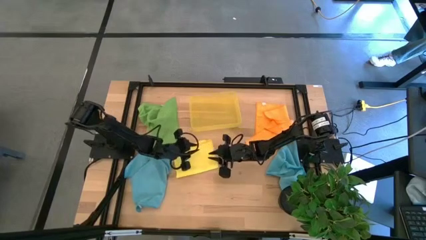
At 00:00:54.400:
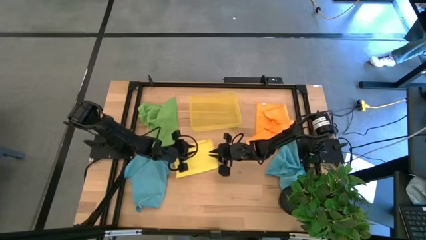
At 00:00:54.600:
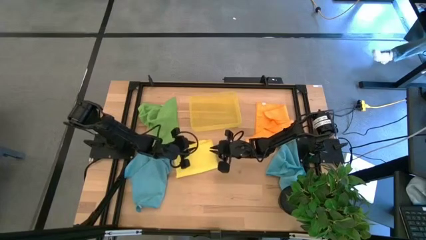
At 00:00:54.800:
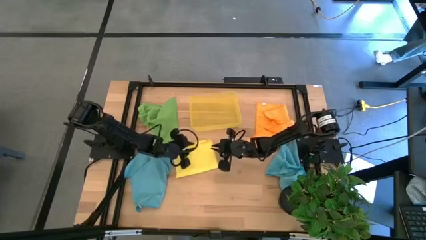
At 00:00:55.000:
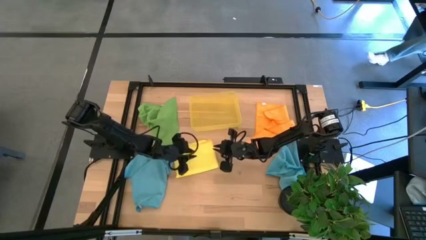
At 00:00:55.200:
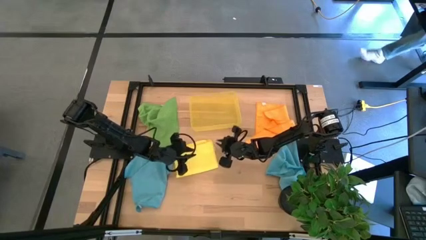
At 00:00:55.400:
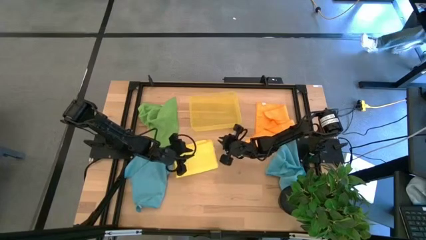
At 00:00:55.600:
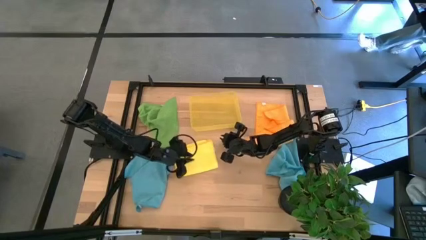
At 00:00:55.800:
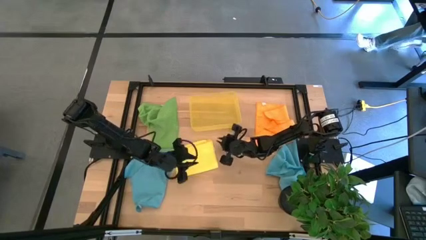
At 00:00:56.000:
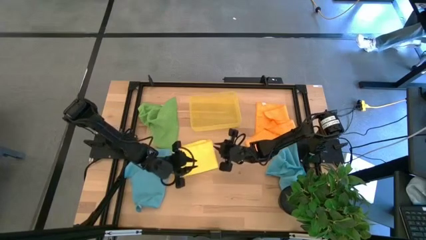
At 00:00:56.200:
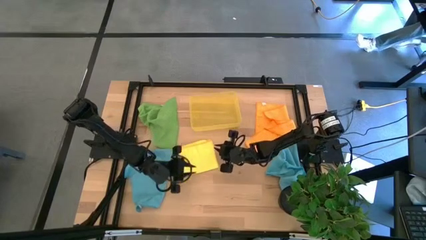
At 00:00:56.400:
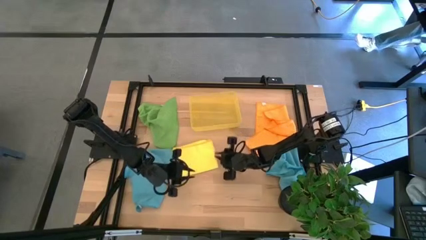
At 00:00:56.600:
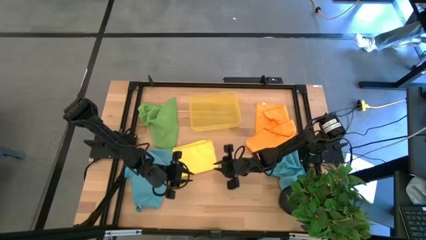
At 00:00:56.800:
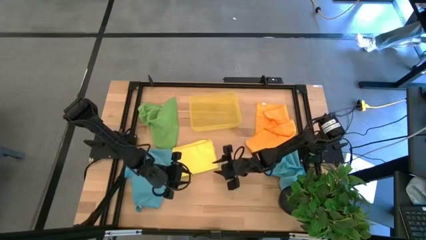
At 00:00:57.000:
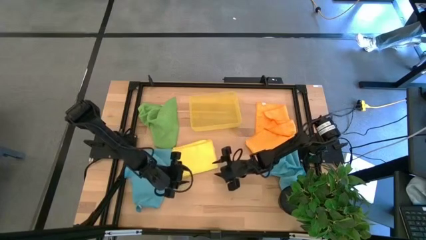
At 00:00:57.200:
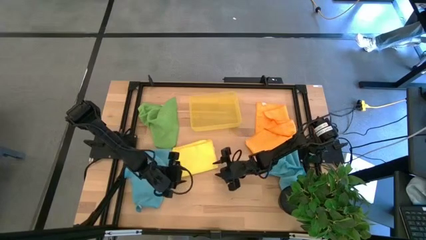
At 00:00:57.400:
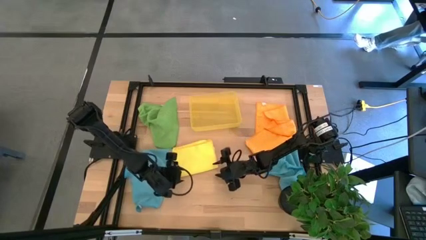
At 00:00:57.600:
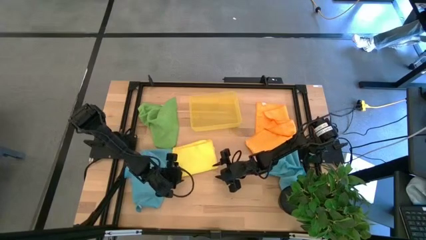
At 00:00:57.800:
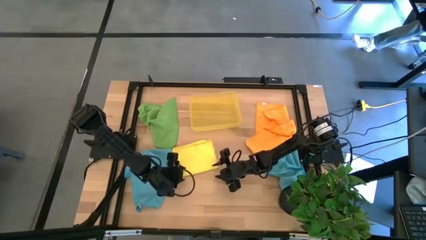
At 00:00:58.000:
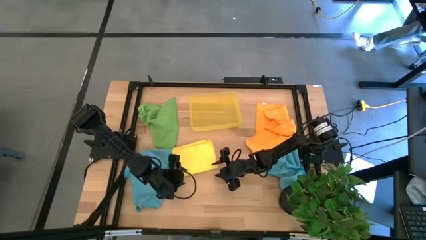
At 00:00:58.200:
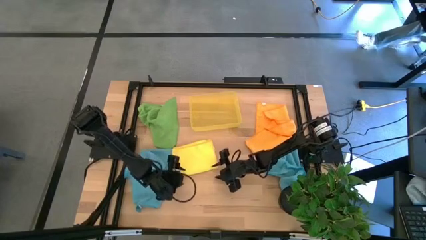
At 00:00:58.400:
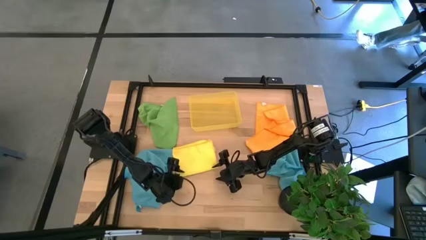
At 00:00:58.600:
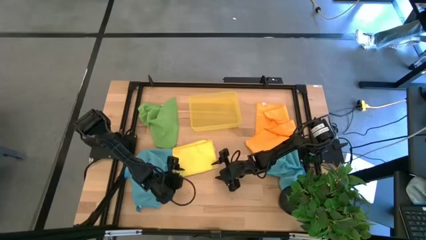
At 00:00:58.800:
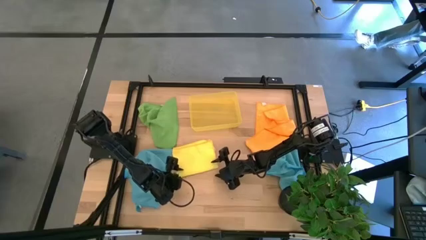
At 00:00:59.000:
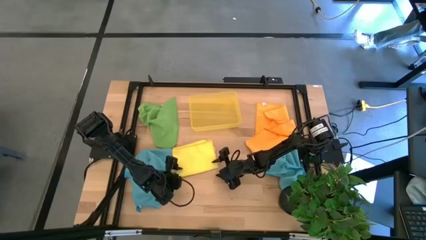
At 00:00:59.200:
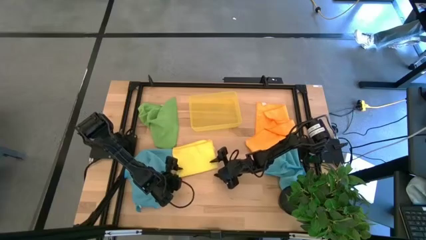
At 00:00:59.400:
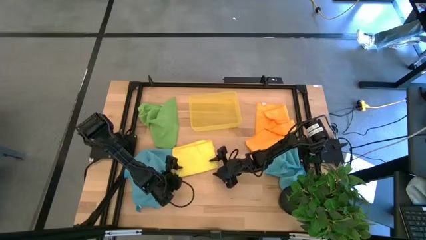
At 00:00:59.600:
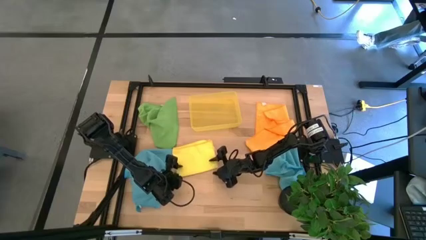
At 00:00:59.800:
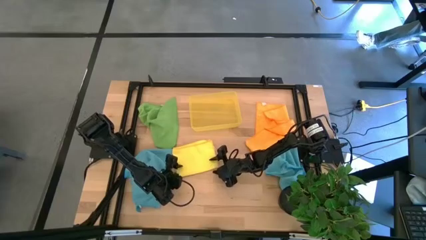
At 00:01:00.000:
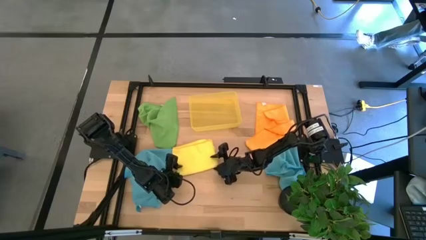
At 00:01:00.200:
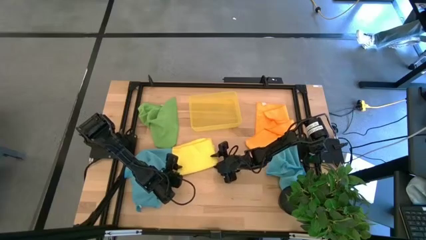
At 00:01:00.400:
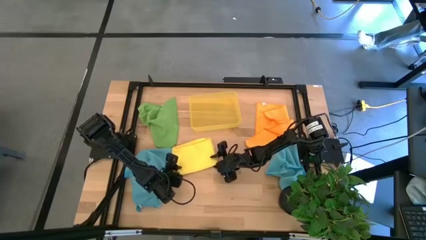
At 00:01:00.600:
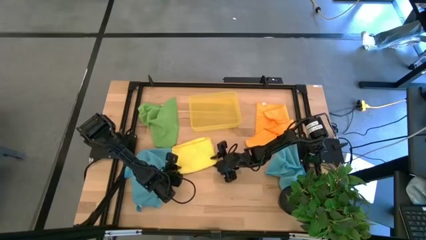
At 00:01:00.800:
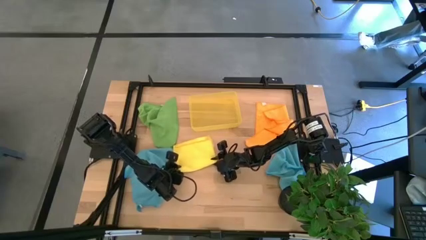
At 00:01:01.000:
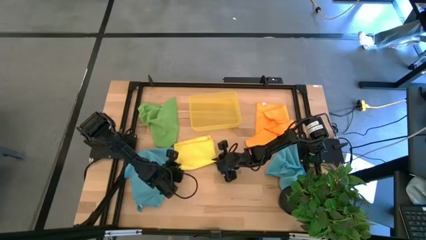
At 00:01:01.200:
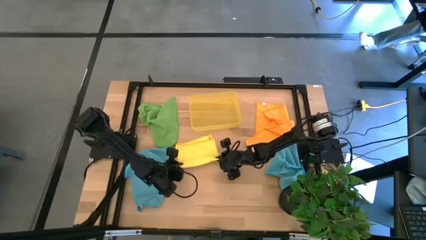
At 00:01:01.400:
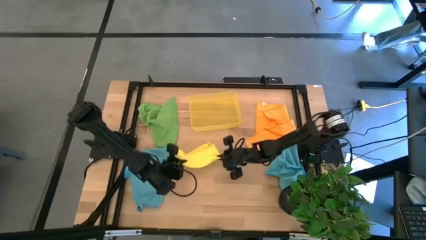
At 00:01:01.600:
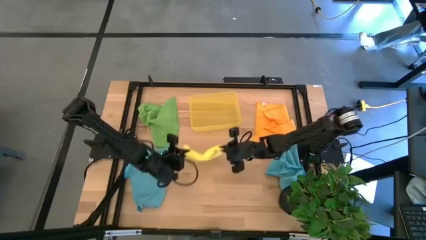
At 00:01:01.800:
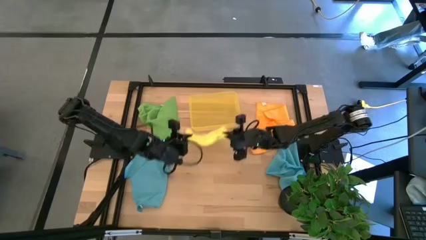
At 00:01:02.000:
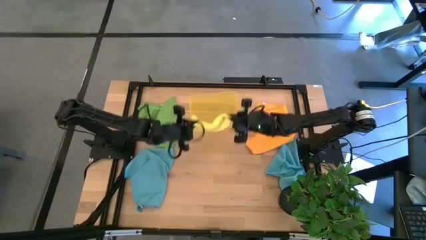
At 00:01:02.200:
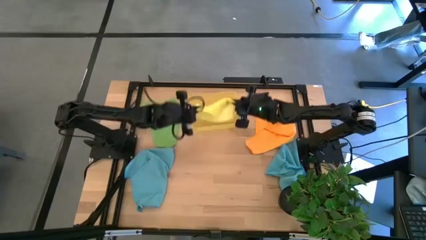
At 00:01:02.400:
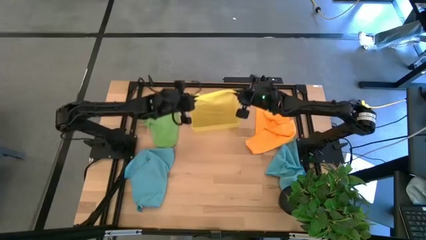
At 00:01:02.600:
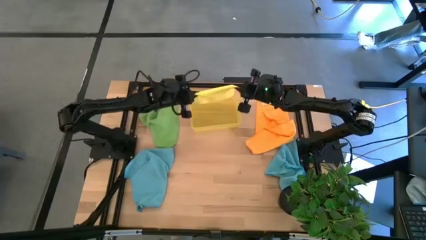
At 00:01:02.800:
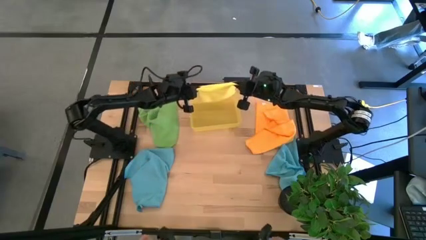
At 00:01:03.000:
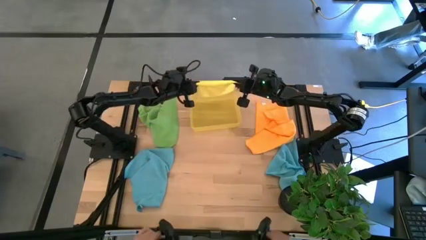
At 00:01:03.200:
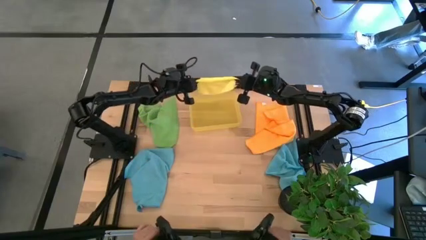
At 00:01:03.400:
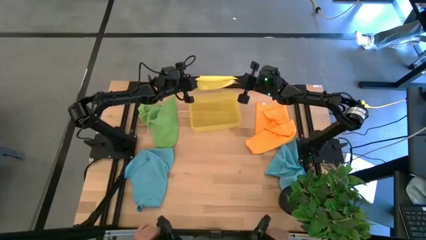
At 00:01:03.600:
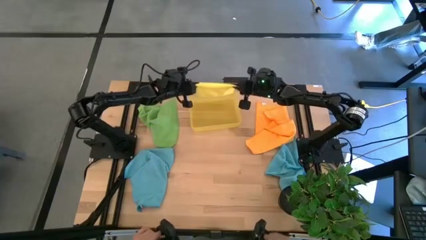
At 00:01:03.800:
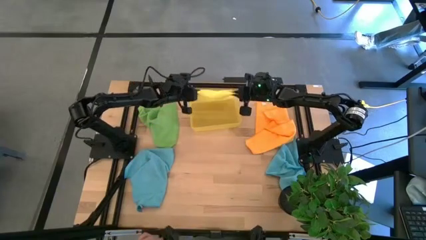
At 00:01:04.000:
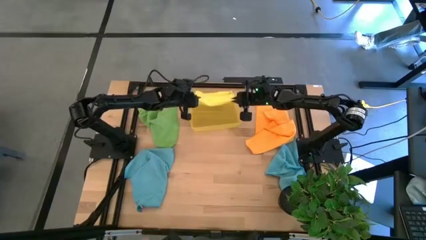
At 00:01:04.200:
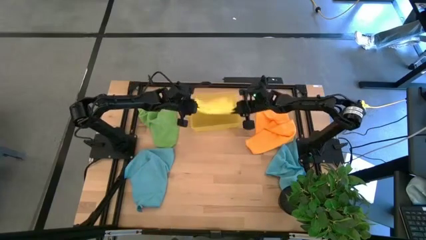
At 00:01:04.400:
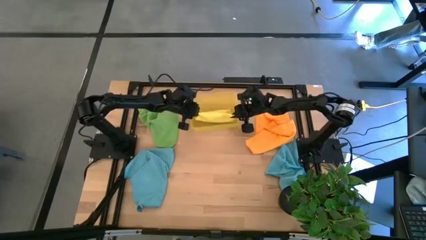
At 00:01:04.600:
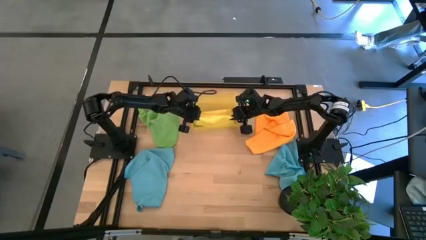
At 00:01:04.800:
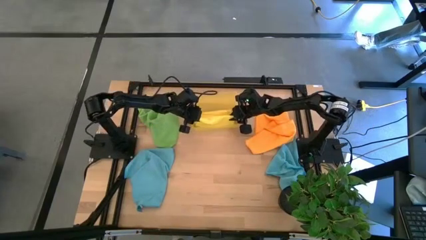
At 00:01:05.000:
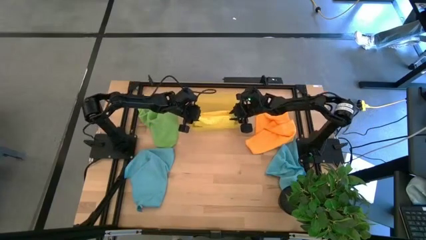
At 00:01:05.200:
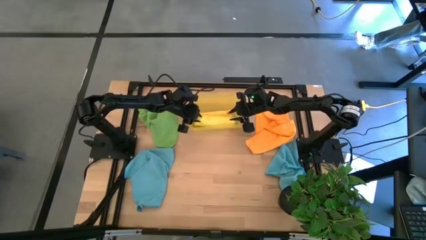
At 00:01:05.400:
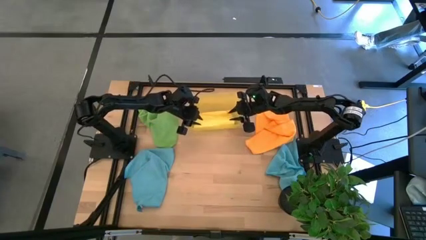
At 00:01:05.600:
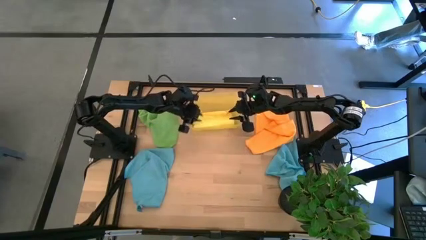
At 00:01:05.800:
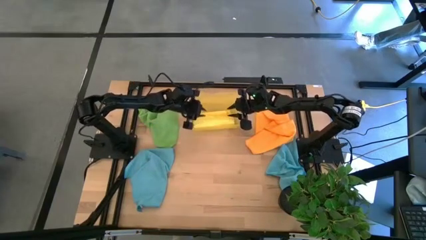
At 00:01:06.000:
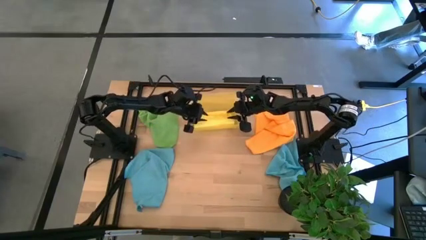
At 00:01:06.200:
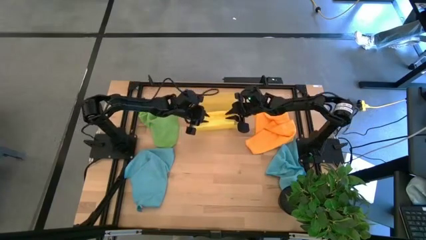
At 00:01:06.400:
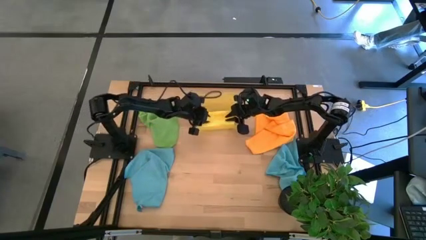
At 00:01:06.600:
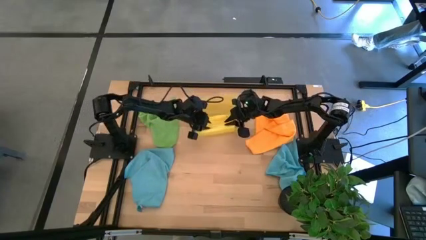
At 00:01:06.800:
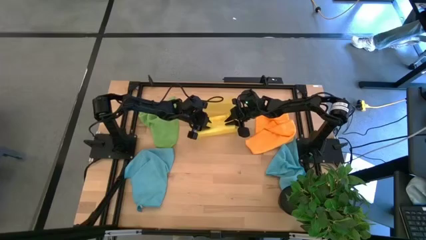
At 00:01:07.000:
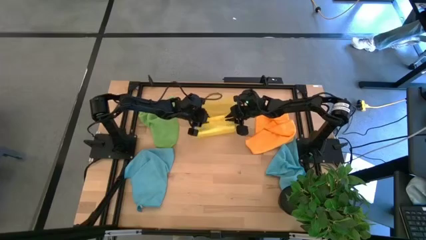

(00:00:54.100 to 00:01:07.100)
Task: Fold microfiber towels
Put the yellow towel into the yellow bin
